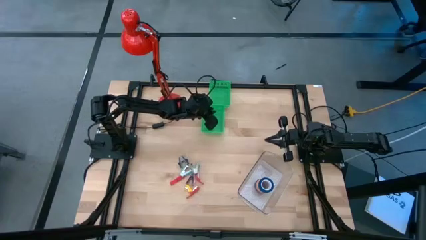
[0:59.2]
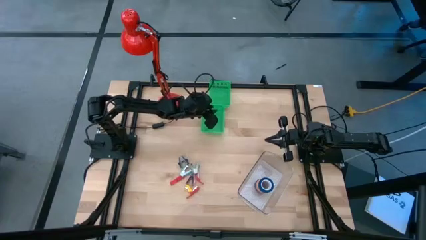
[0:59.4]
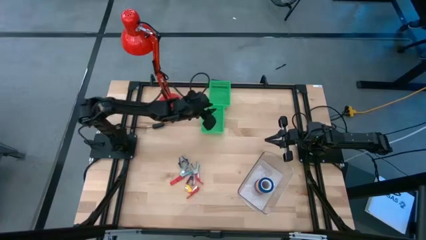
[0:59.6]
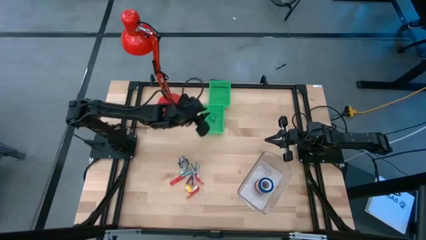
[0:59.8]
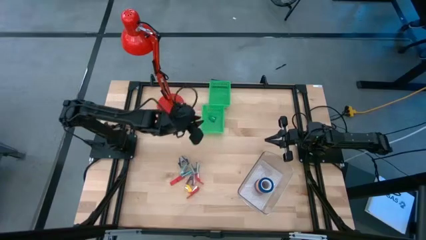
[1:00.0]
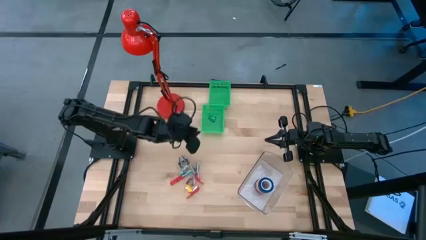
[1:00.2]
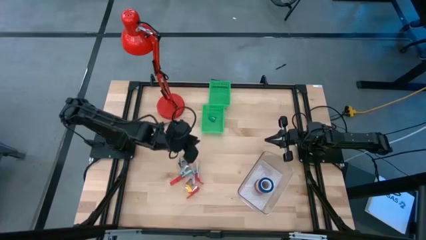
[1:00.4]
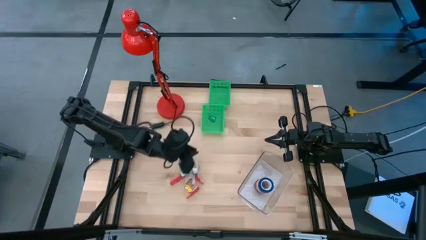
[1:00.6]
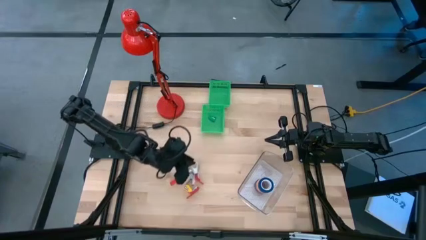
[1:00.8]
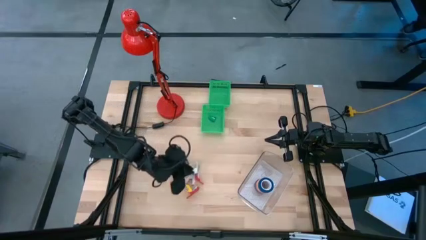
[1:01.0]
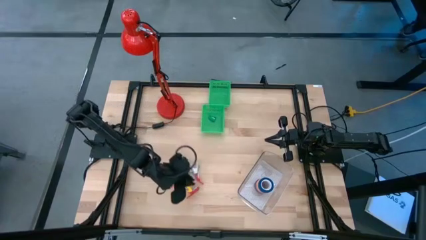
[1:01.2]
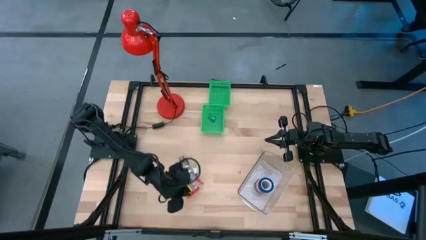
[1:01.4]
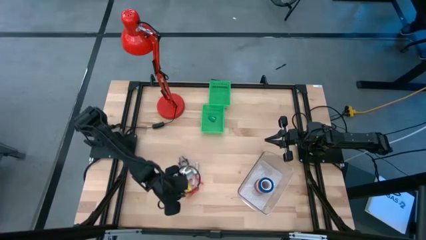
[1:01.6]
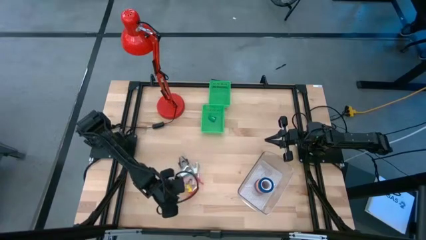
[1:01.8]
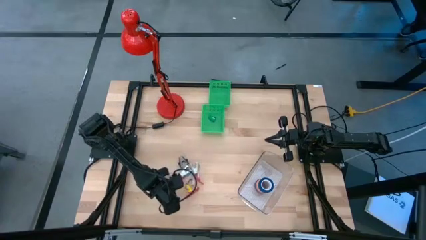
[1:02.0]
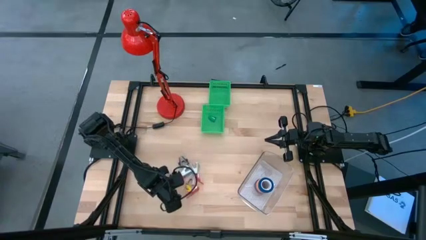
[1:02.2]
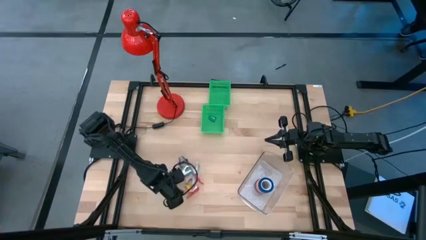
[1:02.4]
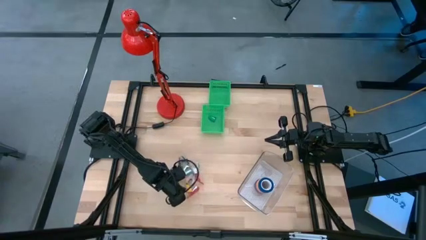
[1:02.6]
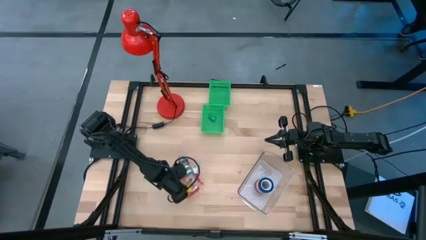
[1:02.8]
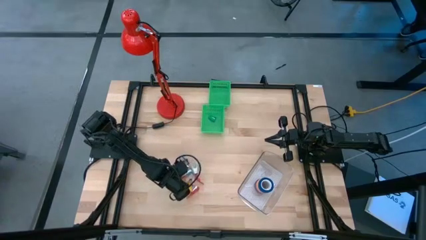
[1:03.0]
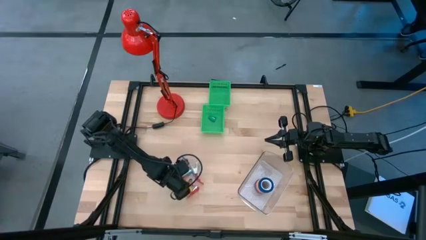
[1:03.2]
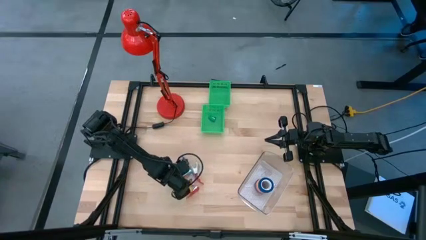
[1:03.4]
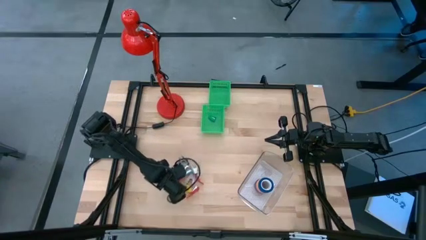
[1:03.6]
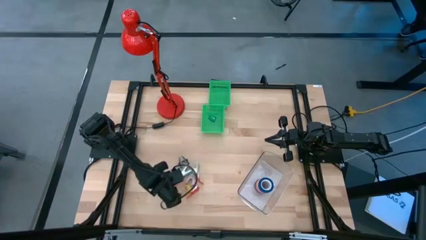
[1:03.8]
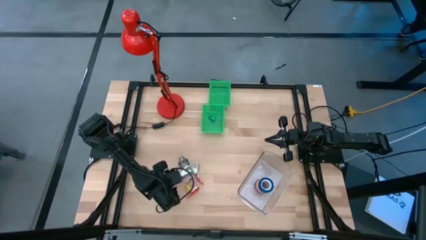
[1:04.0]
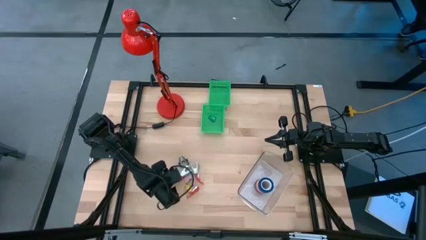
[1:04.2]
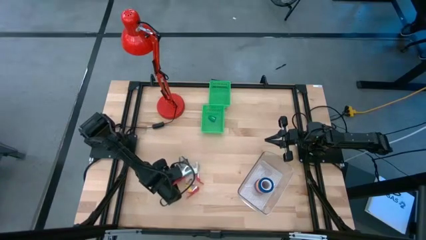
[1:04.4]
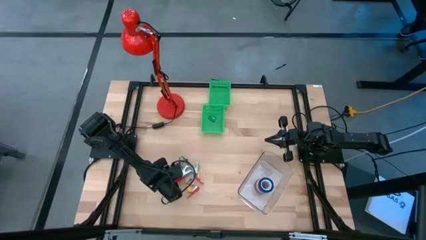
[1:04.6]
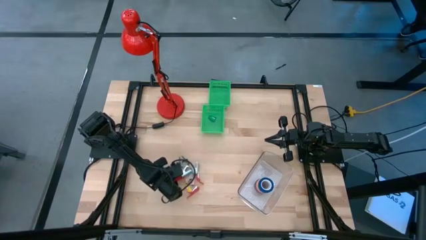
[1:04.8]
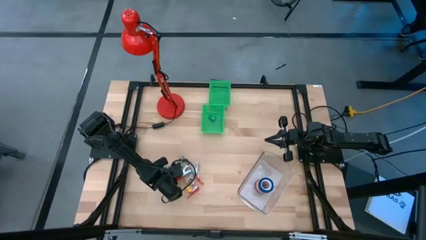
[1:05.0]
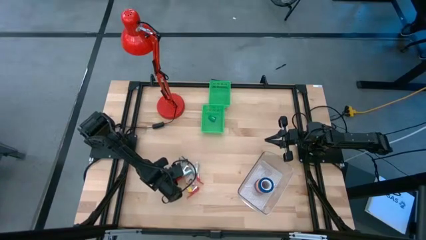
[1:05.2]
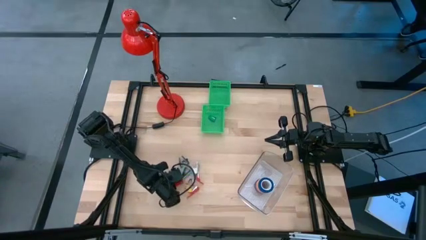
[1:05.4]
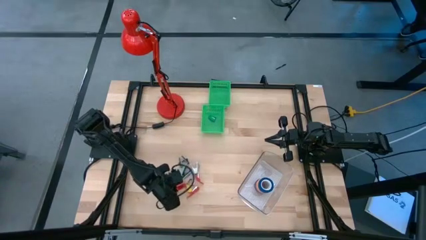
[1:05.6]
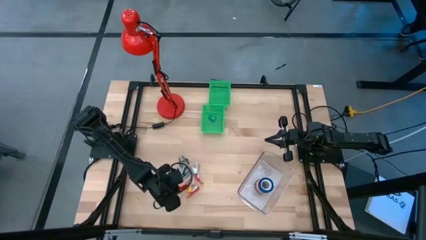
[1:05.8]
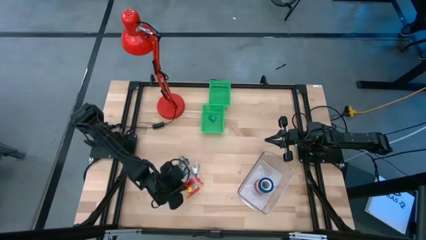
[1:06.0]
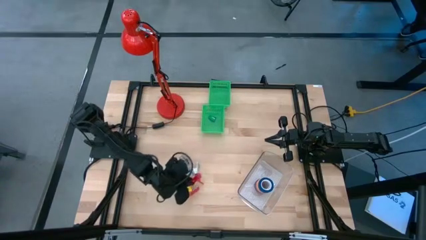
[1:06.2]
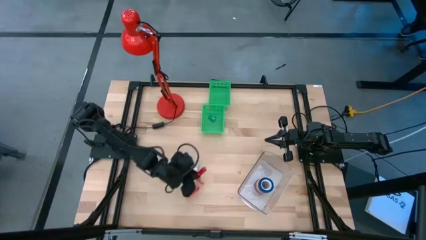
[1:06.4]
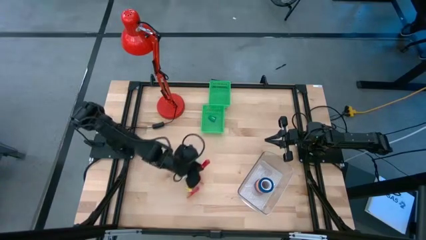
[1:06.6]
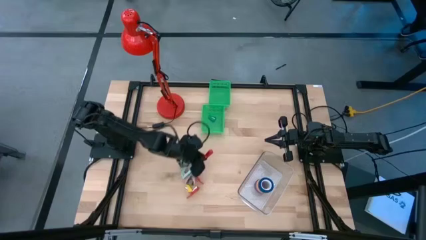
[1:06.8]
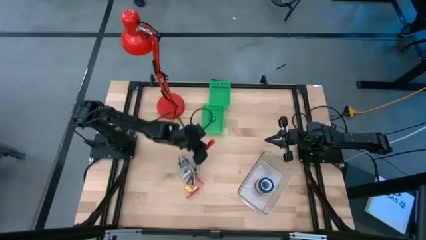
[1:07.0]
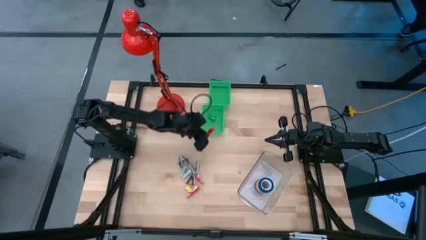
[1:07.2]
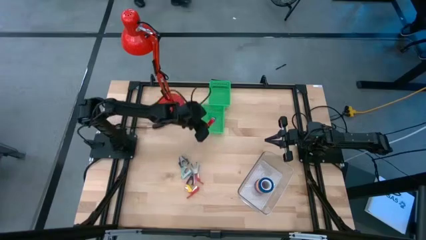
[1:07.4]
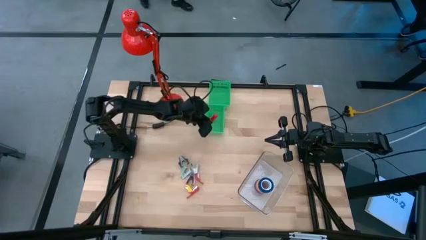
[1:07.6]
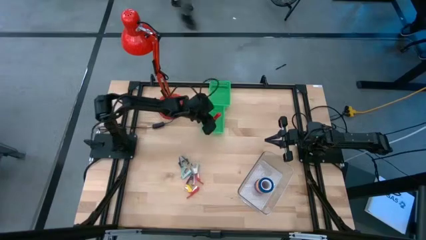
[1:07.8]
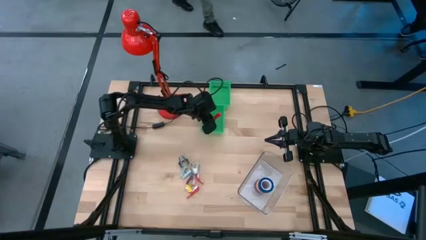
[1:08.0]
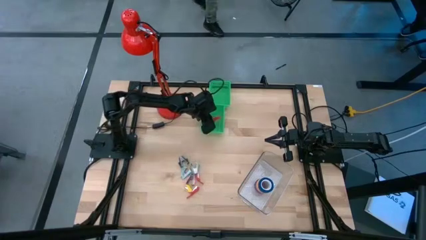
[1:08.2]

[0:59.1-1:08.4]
Task: Pick and place Stapler, Stapler remover, tape
Put the left red stapler into the bottom green bin

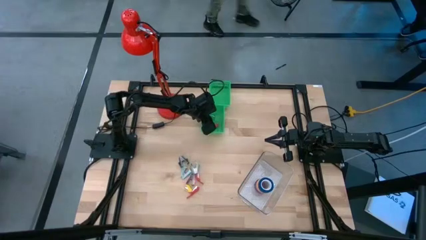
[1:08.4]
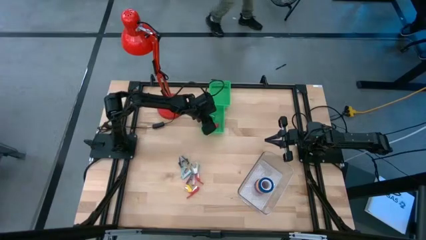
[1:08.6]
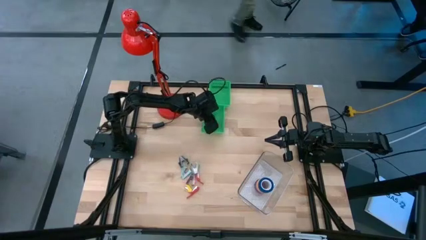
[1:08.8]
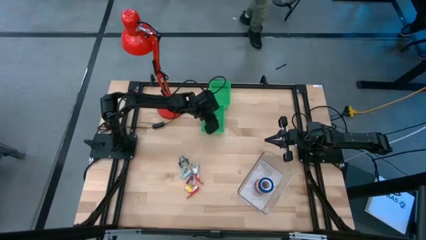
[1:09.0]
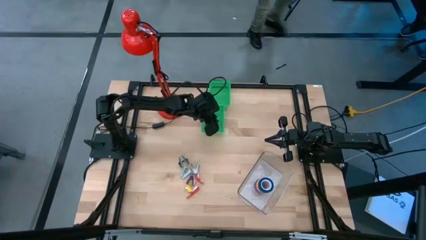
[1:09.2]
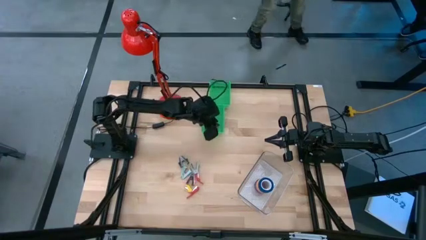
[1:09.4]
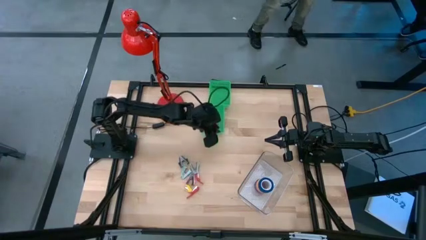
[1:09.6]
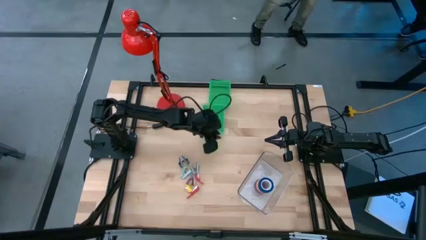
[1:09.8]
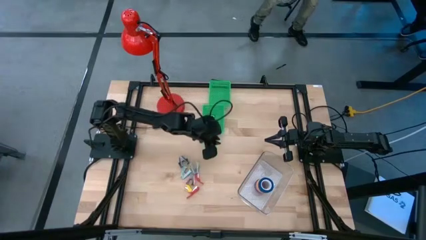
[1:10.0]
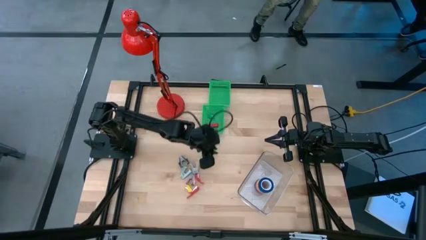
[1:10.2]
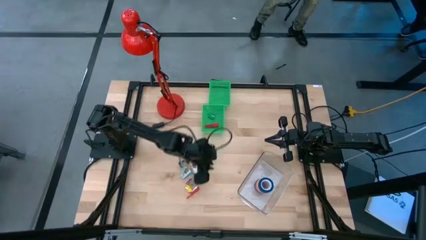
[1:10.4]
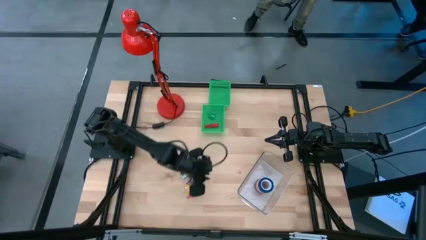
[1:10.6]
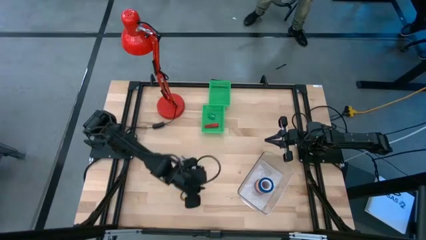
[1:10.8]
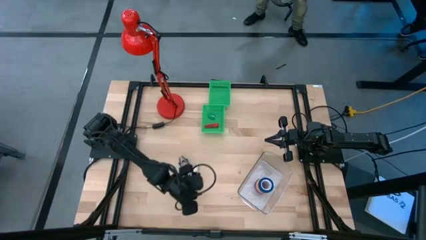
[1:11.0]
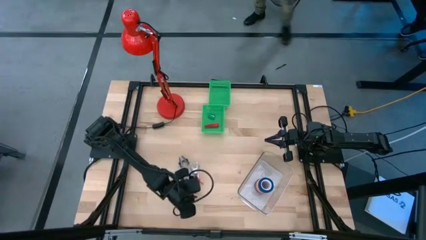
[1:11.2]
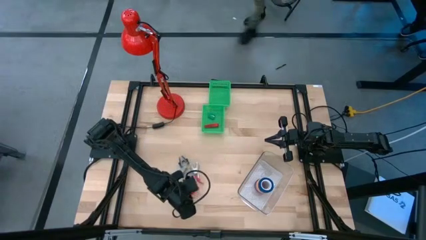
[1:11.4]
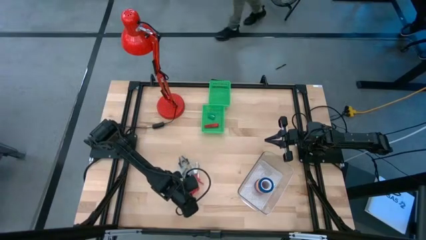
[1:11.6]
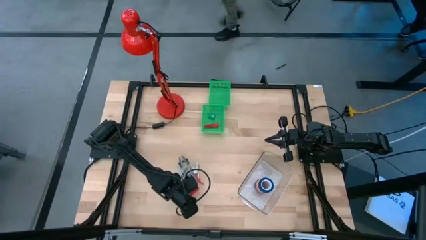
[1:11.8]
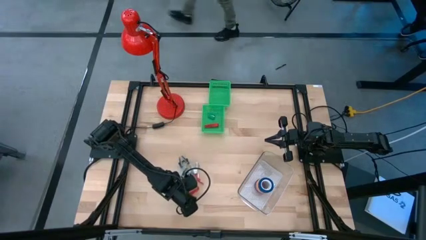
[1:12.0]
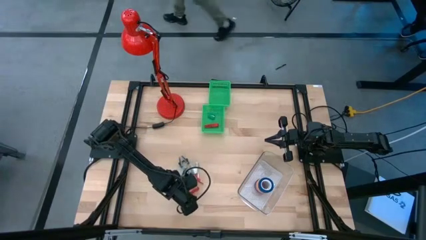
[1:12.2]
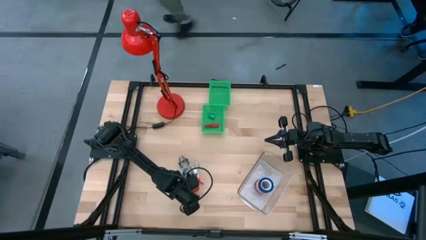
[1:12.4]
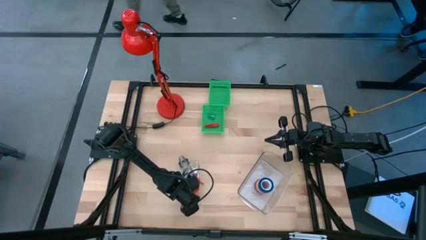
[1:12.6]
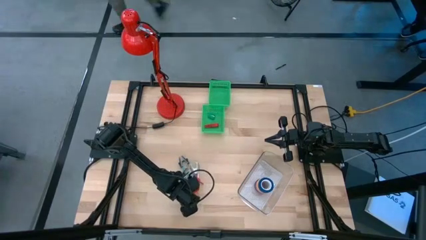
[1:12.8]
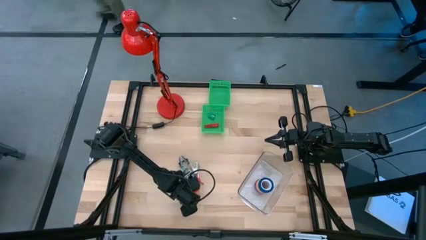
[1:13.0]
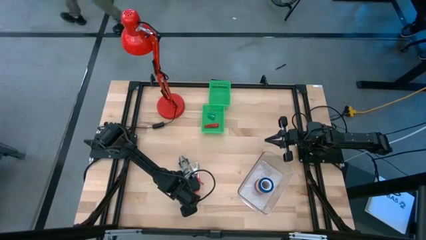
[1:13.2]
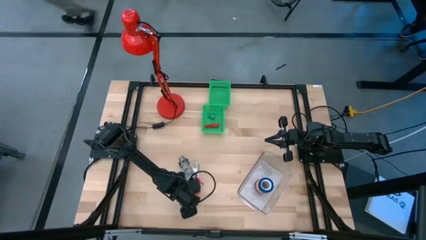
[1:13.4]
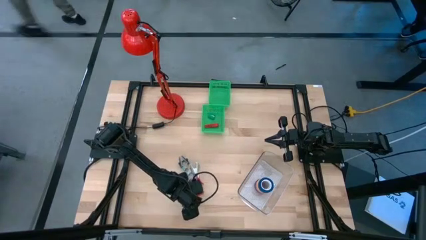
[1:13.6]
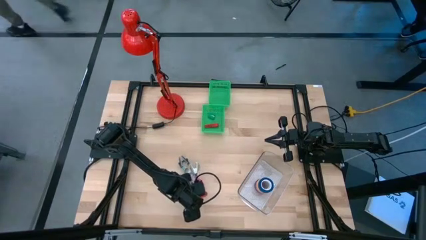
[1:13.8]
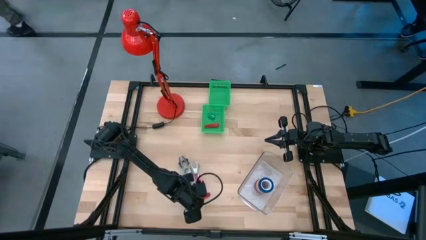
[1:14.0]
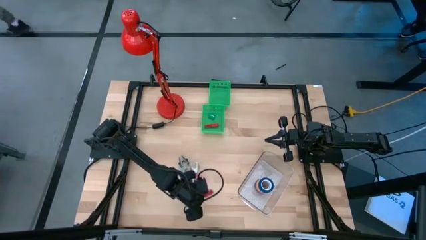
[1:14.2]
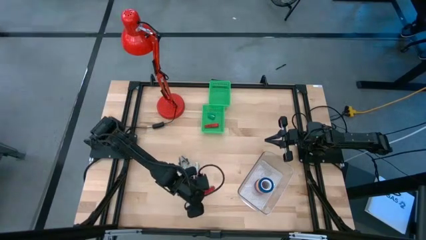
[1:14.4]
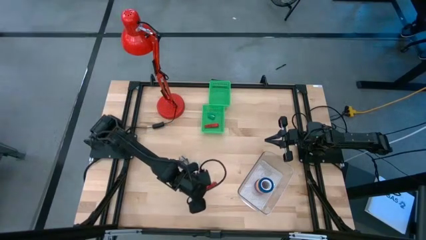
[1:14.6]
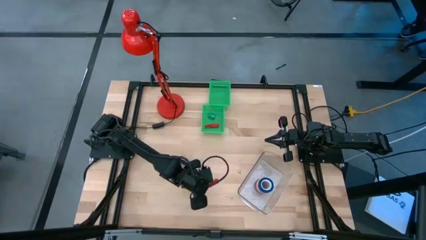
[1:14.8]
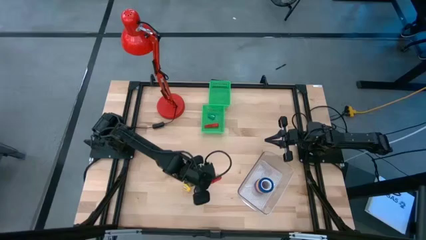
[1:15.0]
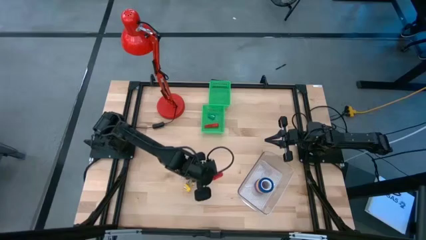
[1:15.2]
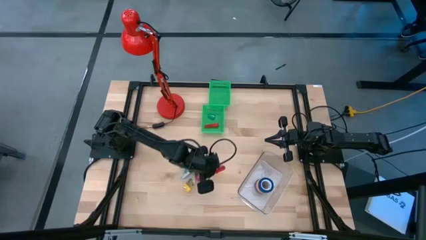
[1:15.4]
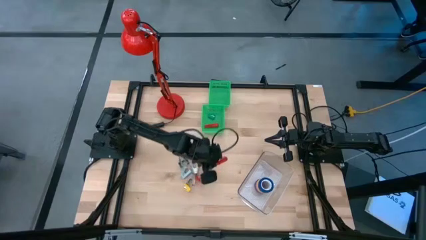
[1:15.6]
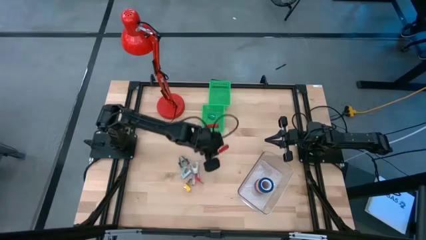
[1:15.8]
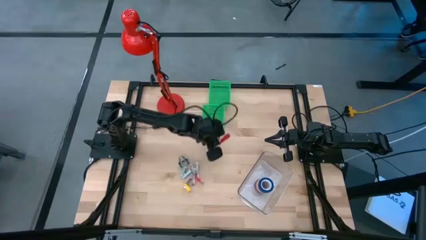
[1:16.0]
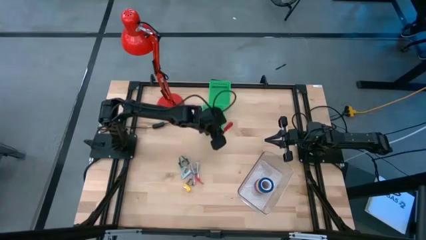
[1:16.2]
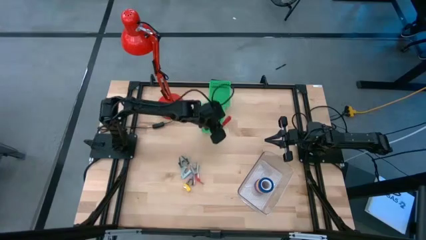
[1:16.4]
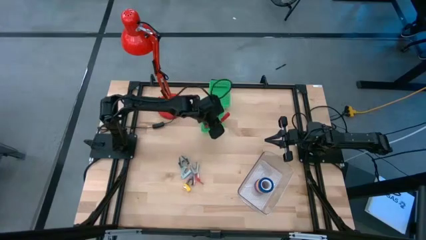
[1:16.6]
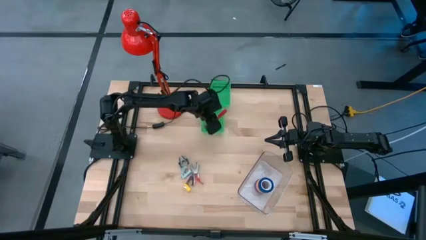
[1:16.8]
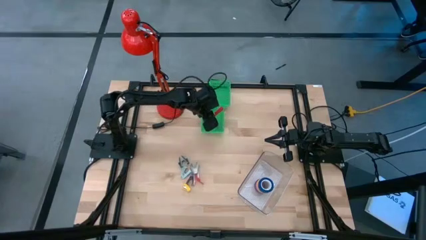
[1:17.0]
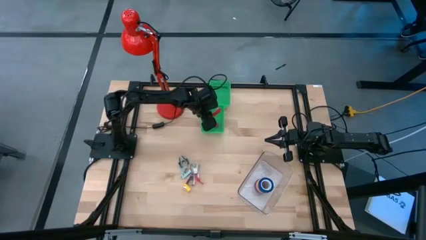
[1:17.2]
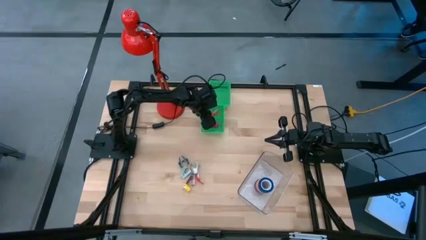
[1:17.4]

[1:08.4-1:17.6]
Put the bottom red stapler into the bottom green bin
